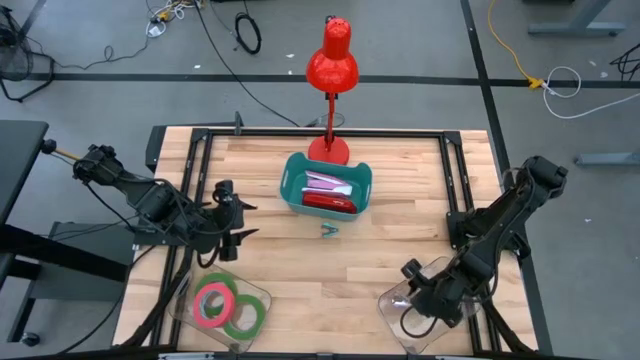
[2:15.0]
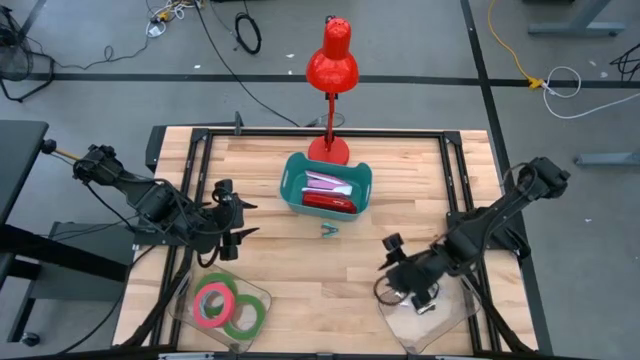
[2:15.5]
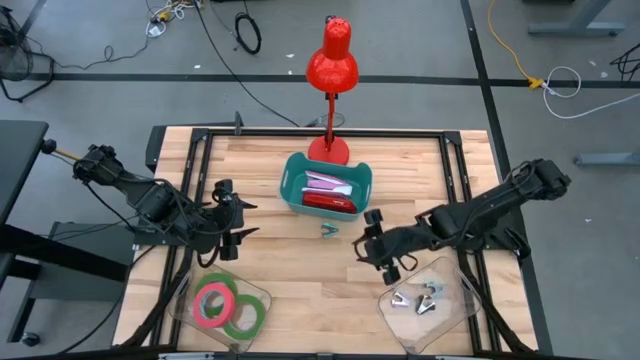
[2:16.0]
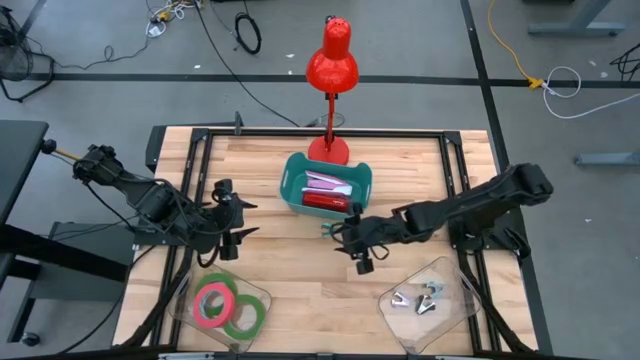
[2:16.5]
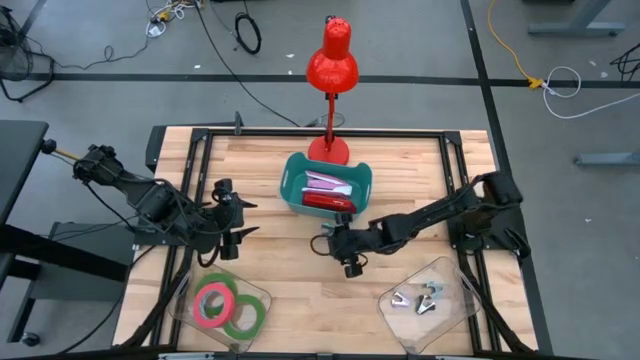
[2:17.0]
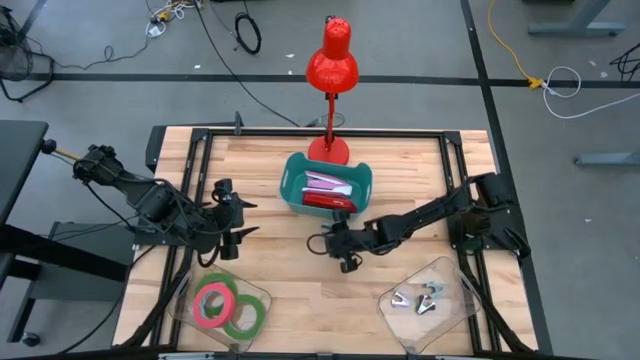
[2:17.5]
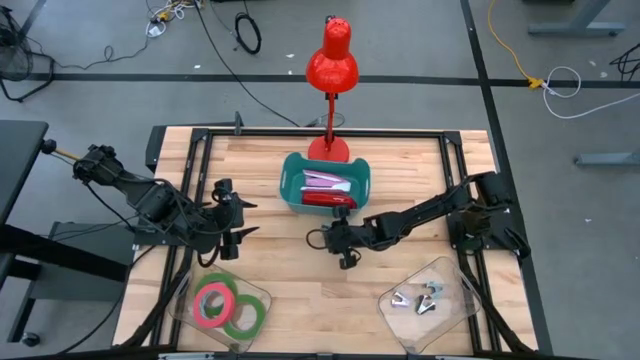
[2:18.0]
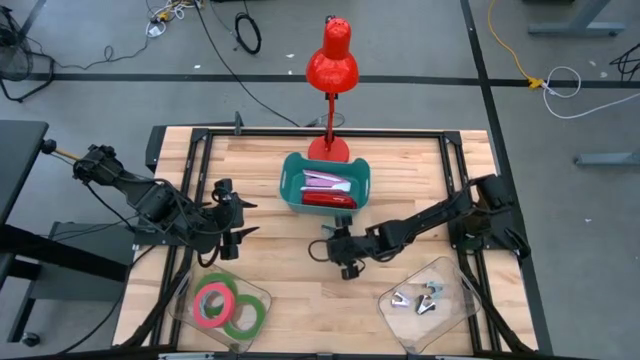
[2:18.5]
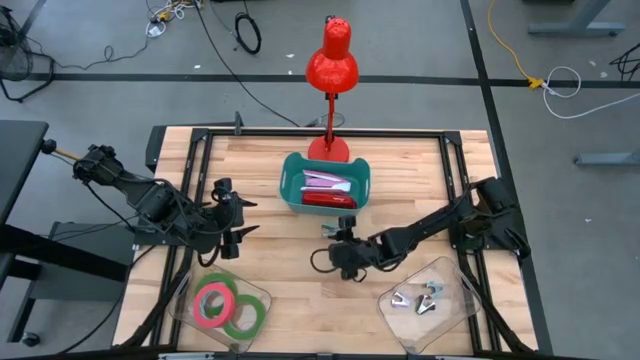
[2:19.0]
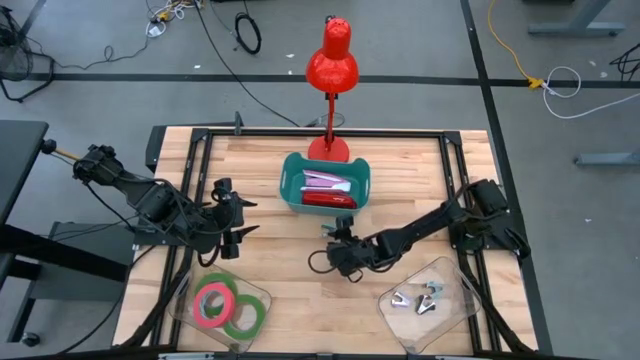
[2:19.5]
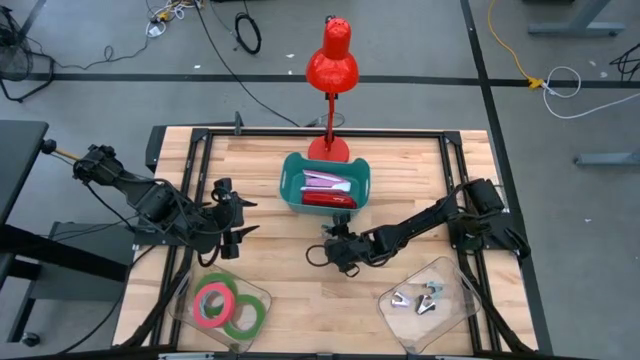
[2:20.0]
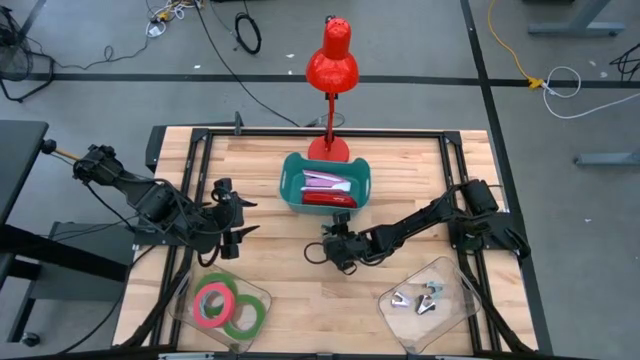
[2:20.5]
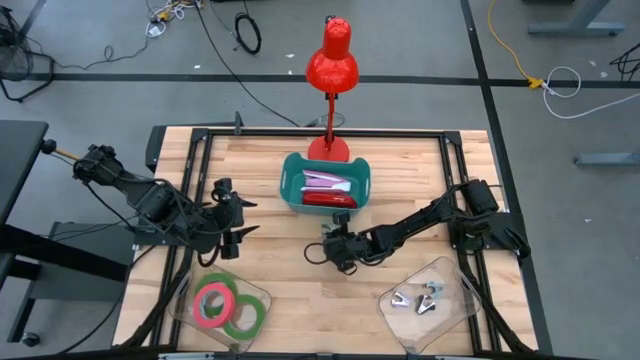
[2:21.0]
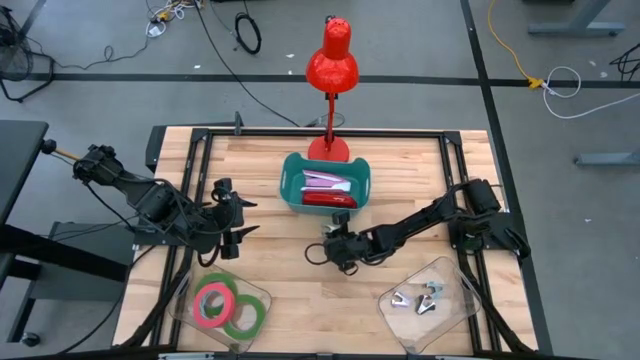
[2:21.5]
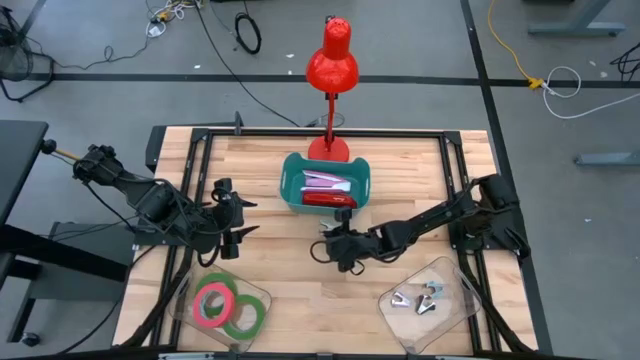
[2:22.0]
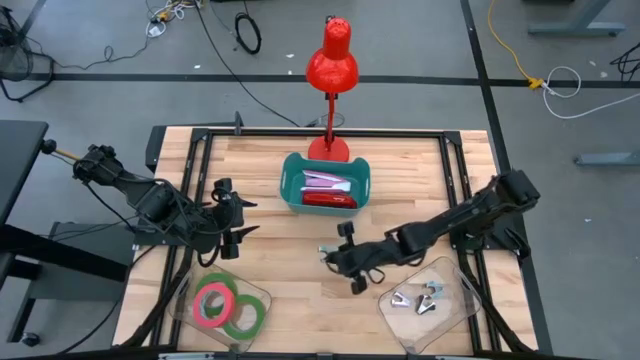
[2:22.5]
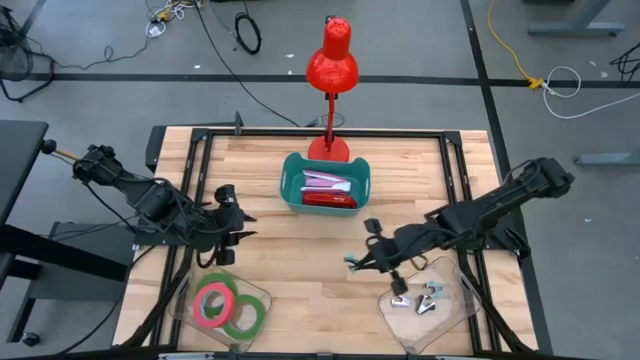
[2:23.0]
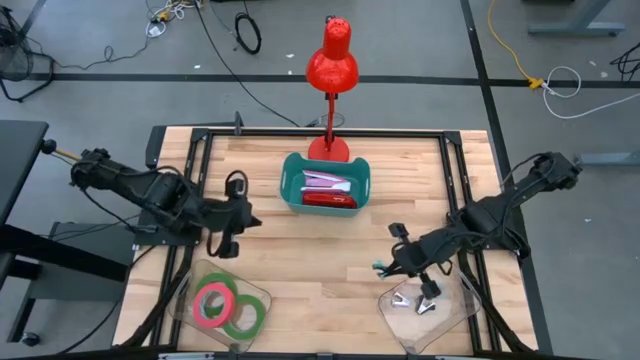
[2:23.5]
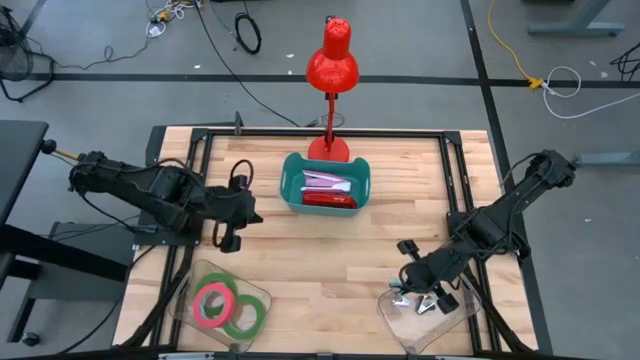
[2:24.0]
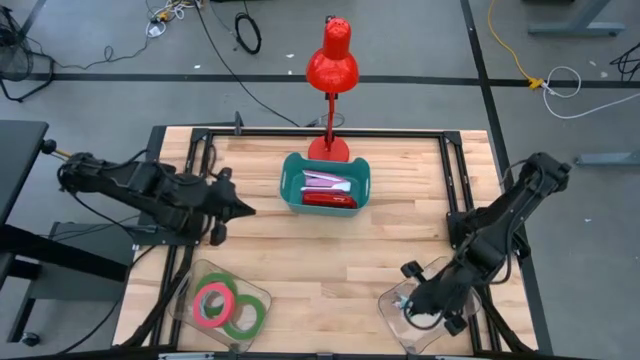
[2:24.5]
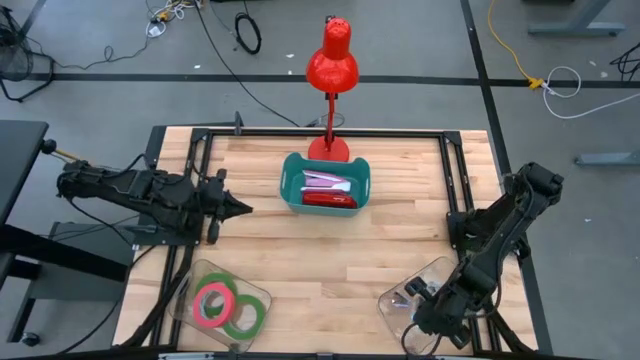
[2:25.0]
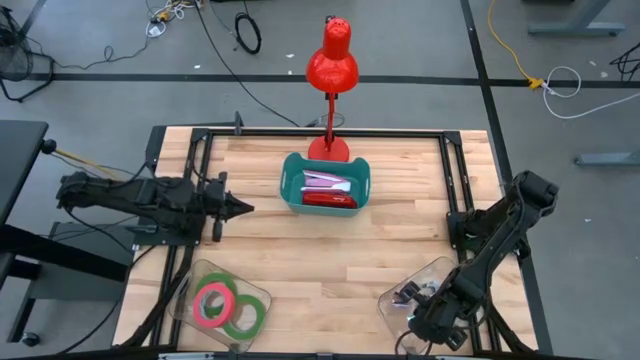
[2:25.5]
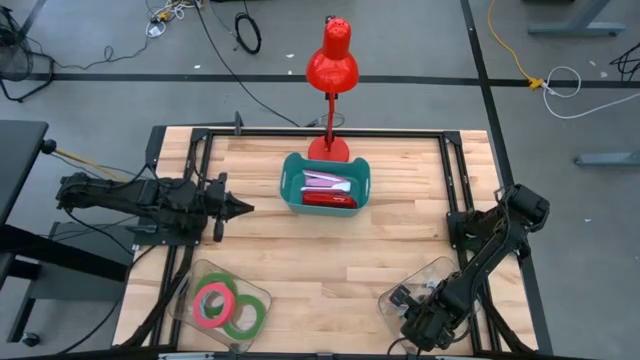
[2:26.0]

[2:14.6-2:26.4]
Task: Pick and place Stapler, Stapler remover, tape
Put the blue staple remover in the right transparent bin
